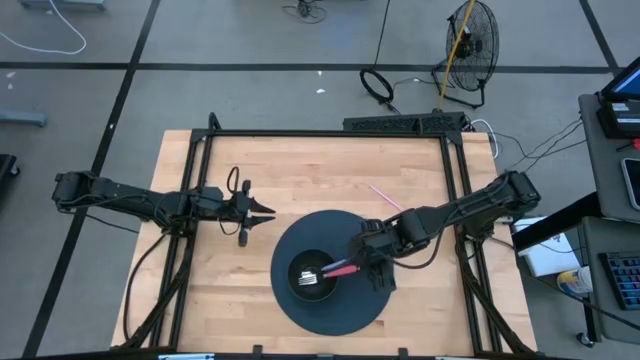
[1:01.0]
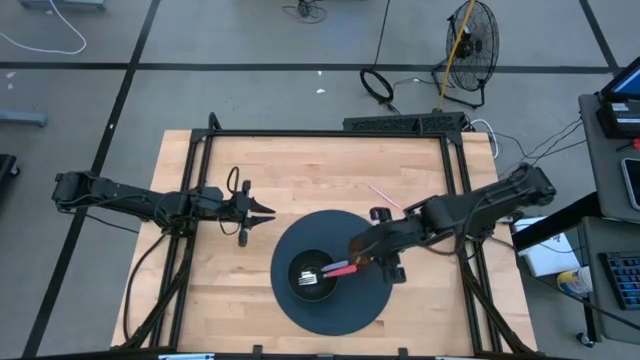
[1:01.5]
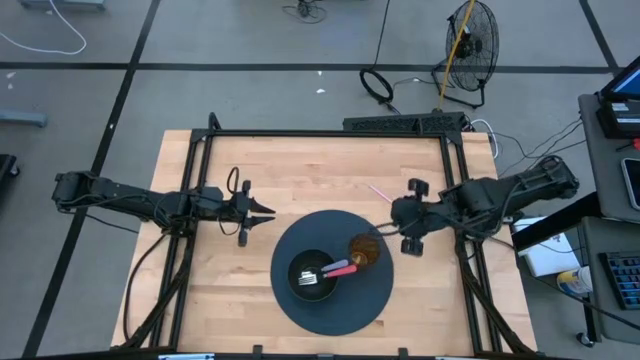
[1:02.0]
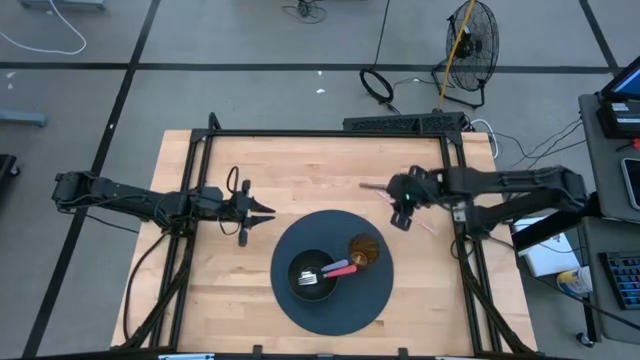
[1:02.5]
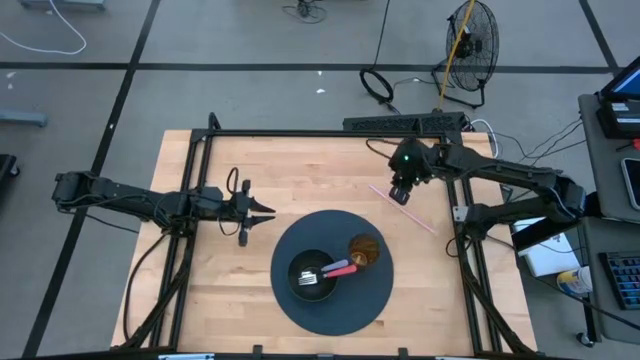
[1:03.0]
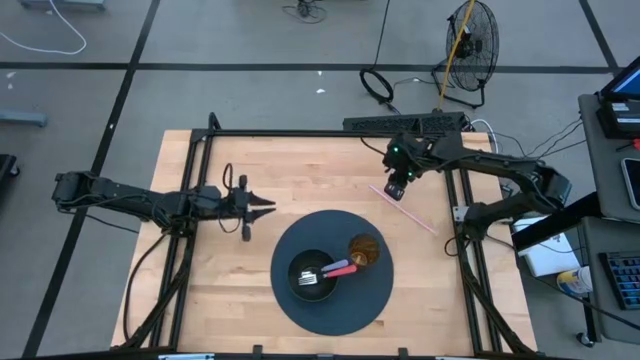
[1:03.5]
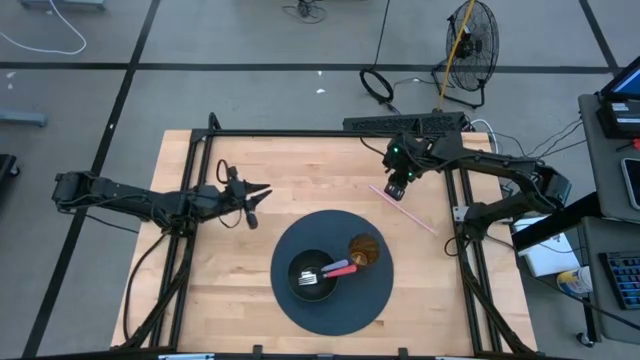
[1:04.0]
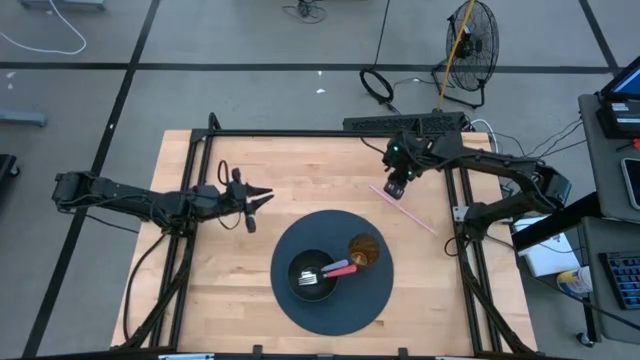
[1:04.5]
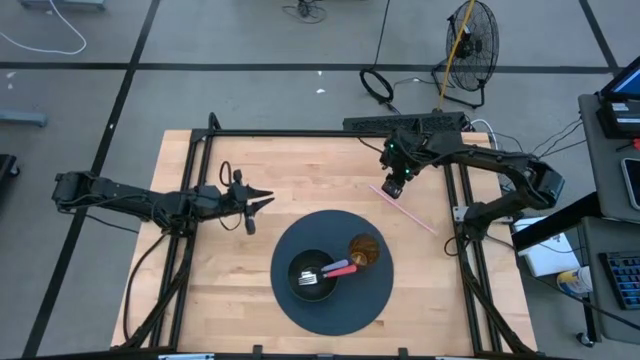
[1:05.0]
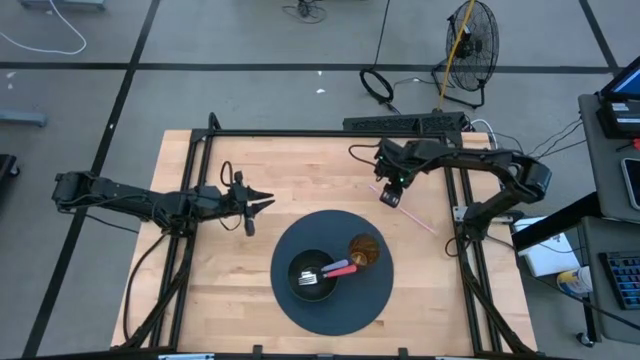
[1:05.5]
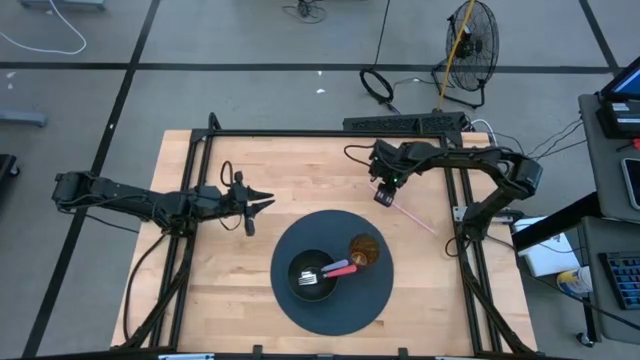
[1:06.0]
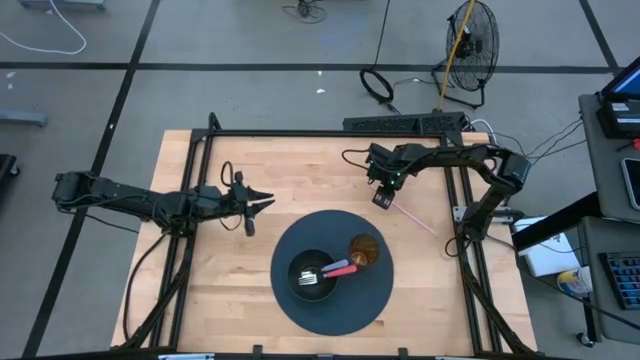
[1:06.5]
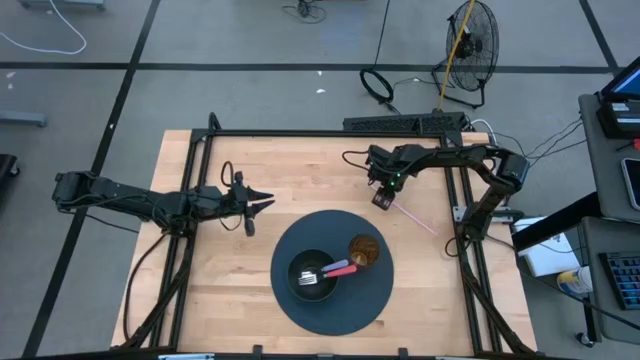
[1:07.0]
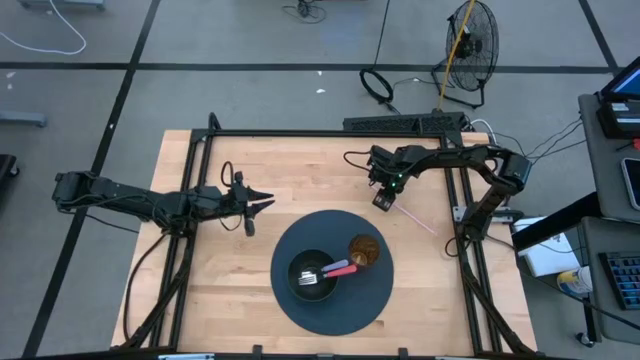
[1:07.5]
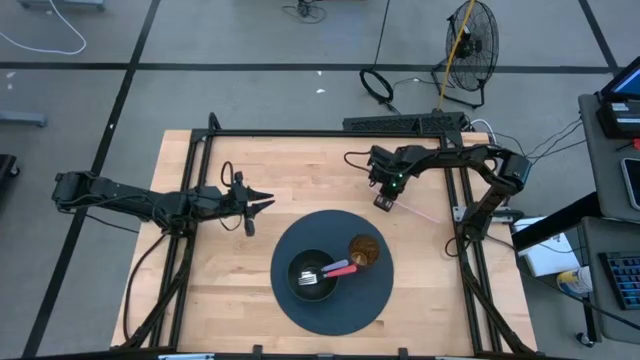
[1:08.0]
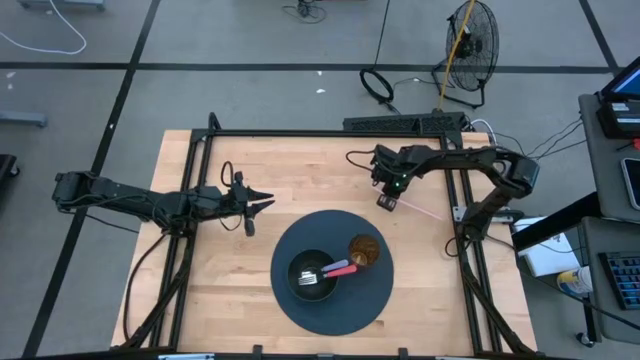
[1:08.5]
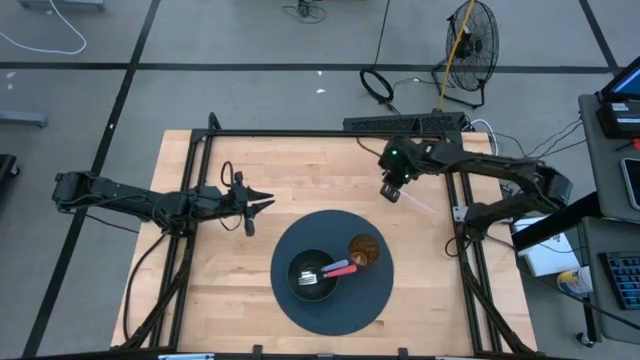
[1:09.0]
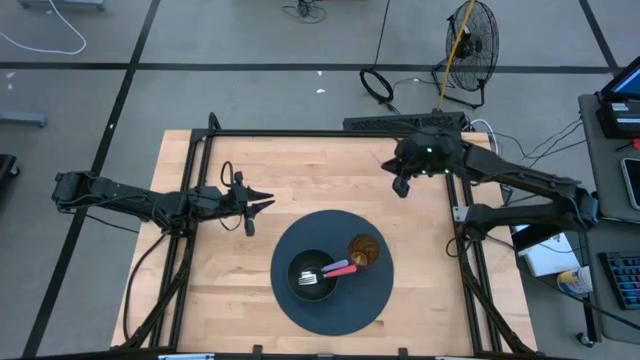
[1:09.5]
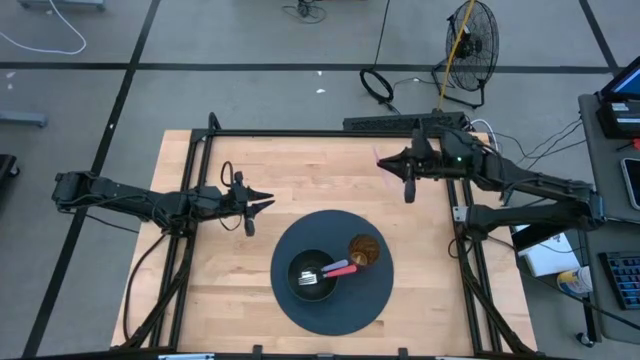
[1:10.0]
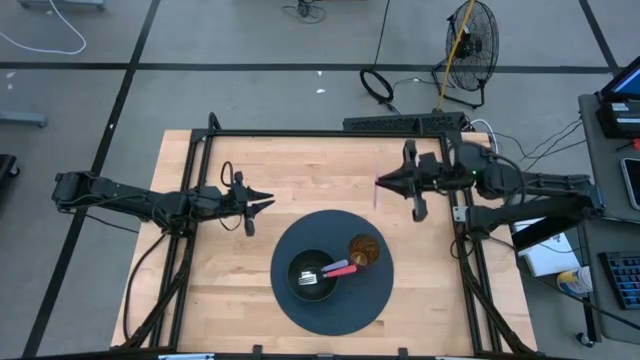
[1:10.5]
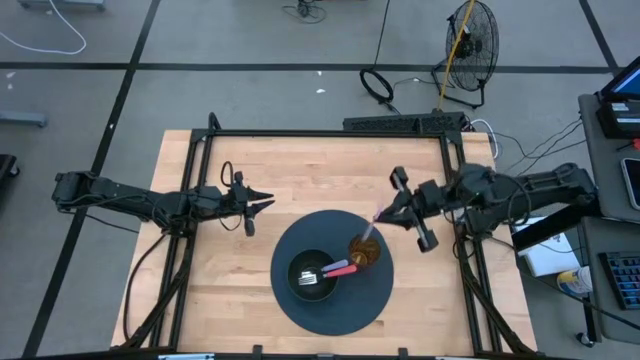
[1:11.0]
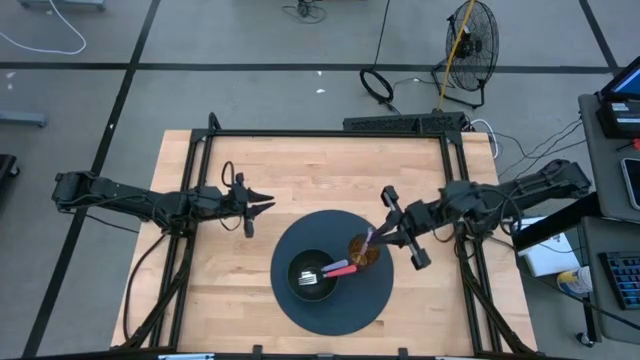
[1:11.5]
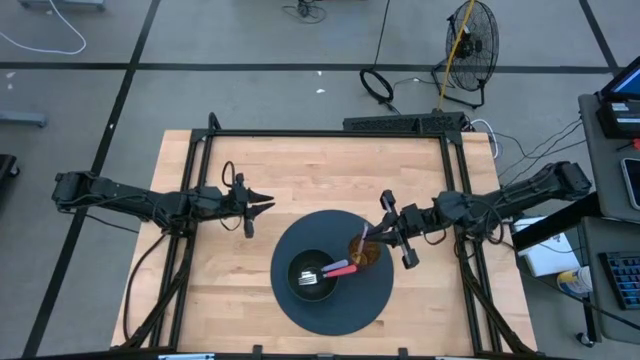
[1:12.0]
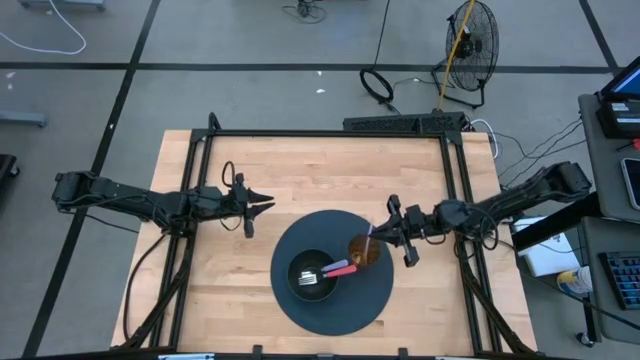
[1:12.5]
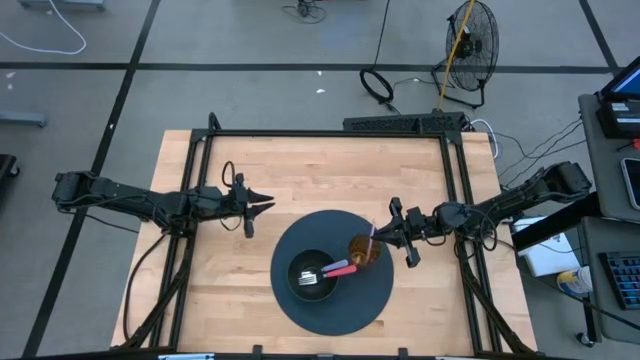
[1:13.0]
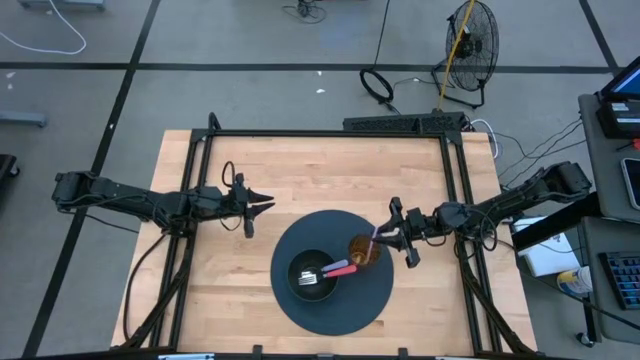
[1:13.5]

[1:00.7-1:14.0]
Task: Pick & Place Utensil
Put the pink straw into the brown cup

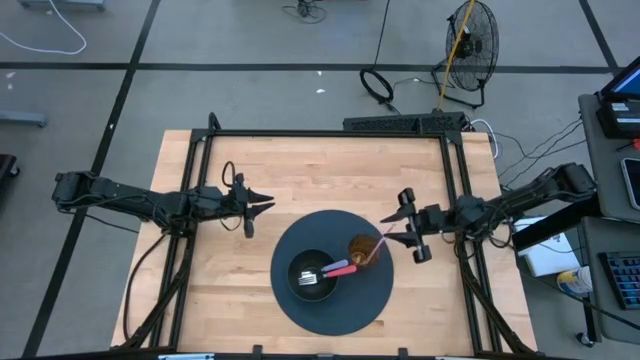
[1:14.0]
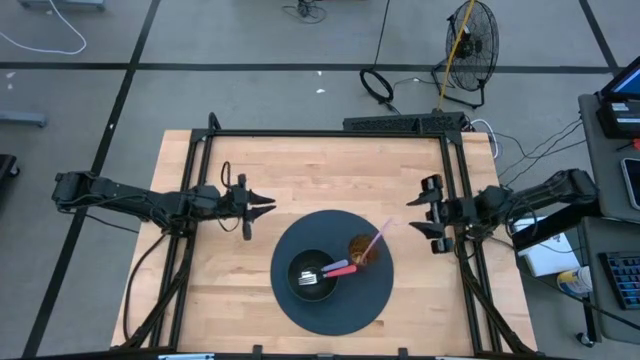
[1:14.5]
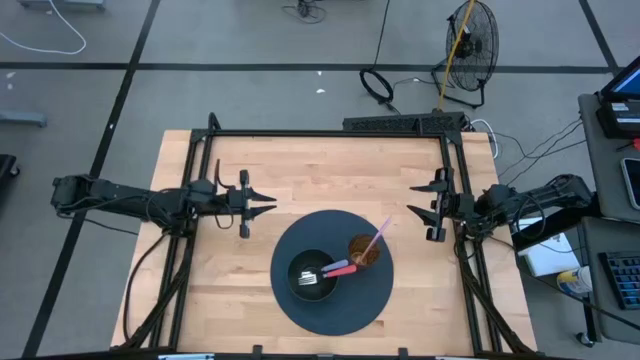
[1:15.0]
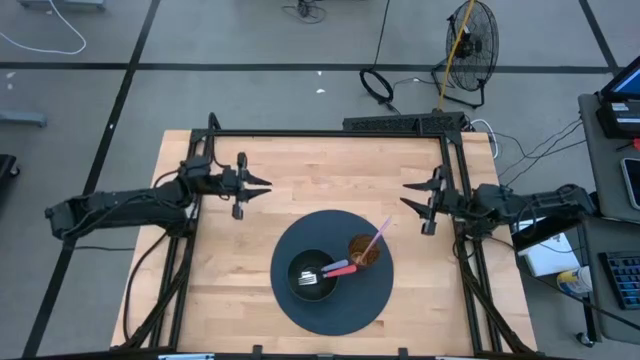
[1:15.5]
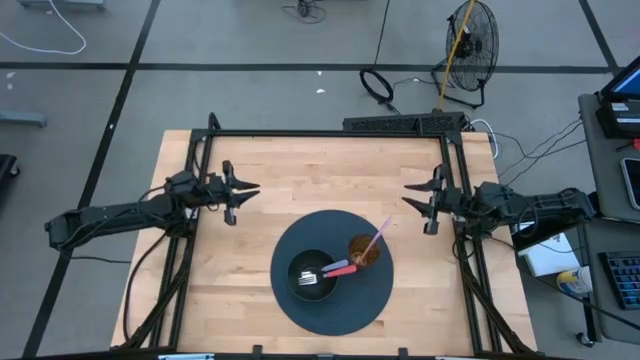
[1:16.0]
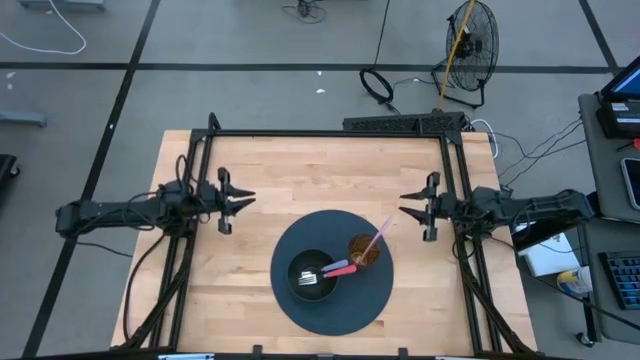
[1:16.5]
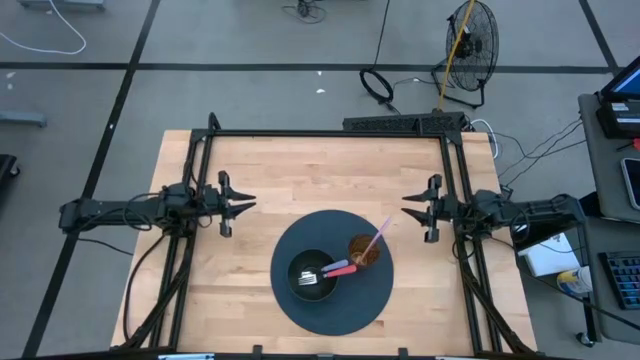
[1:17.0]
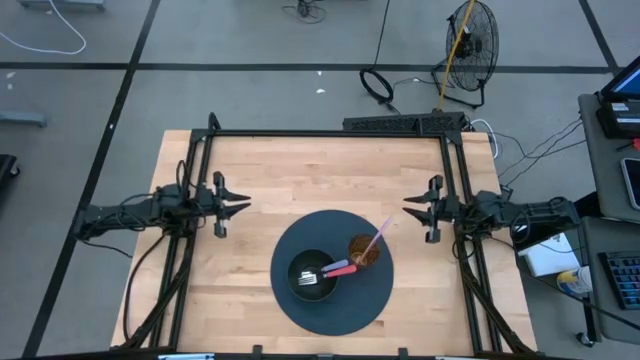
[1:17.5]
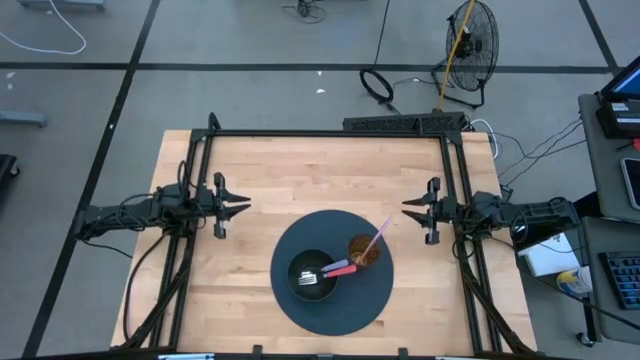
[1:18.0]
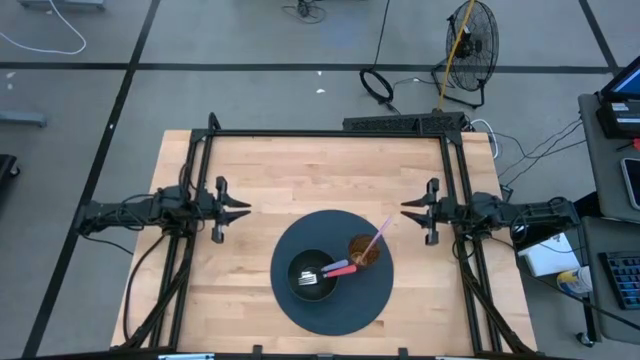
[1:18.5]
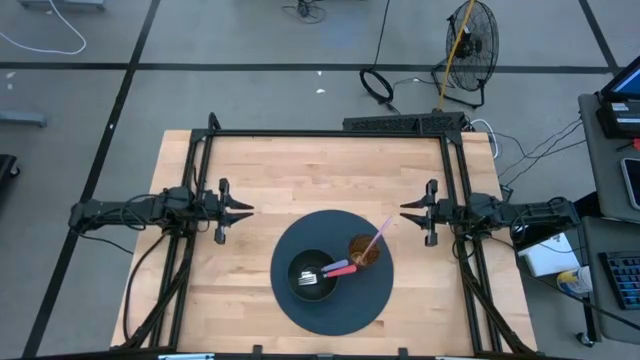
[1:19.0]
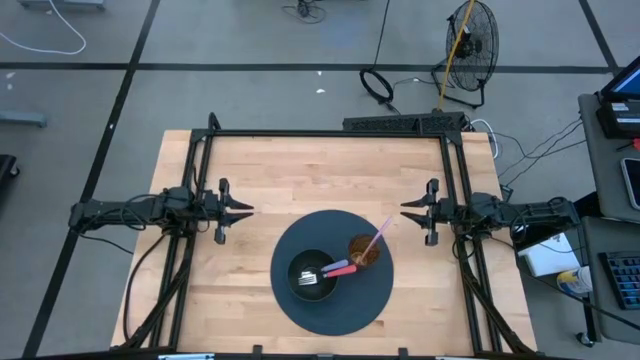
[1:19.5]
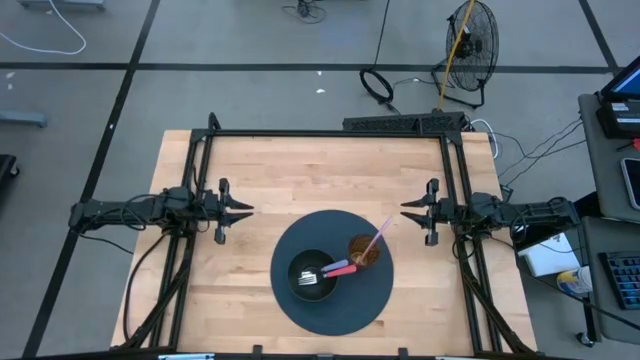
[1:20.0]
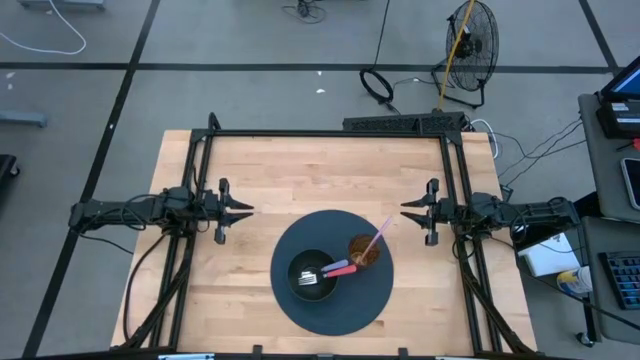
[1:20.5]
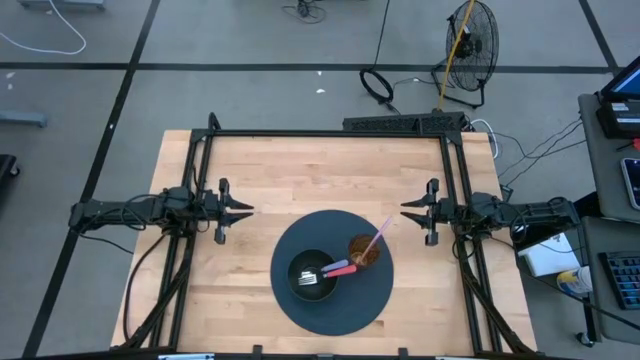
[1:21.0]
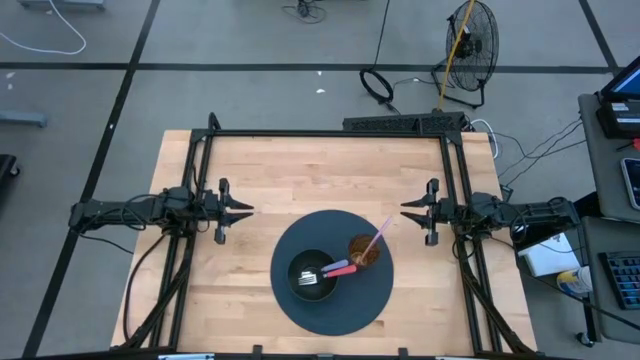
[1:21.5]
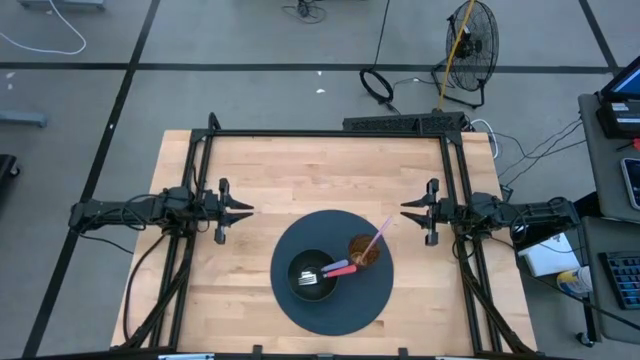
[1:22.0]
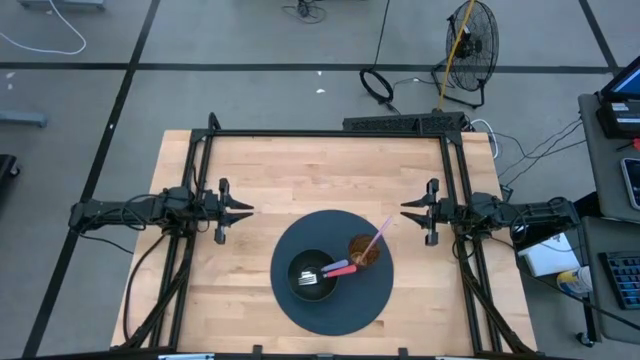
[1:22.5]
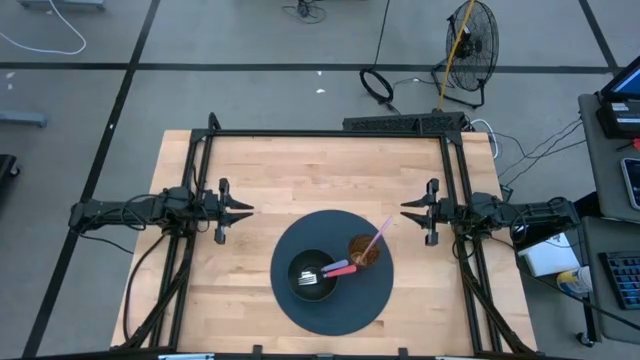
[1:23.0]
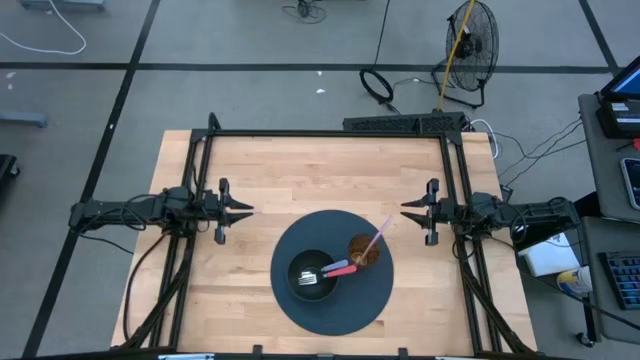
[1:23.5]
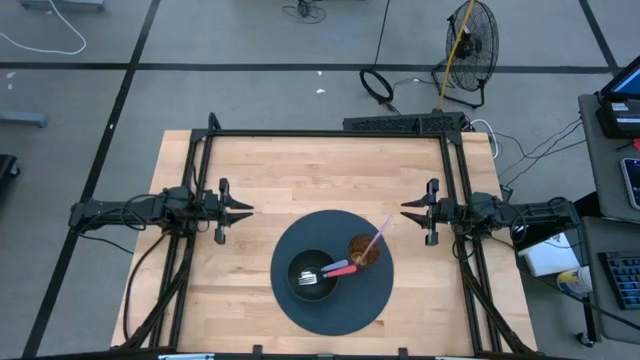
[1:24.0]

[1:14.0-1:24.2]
Return to Home Position
